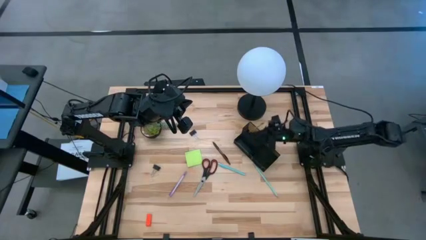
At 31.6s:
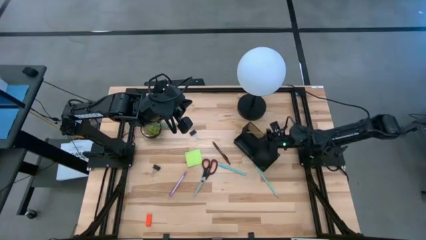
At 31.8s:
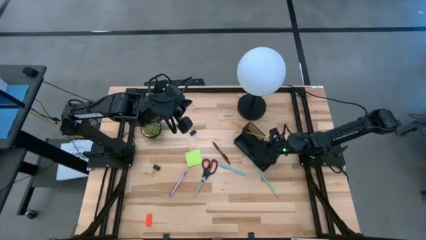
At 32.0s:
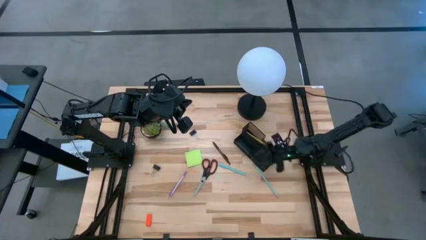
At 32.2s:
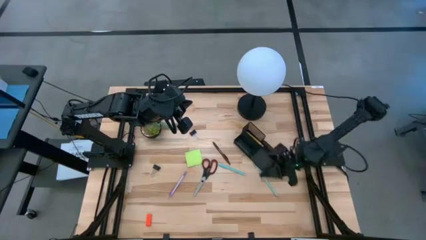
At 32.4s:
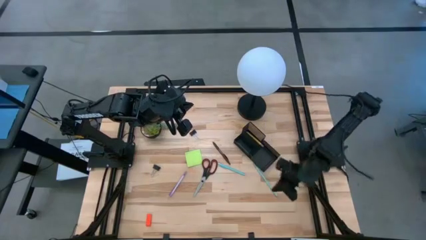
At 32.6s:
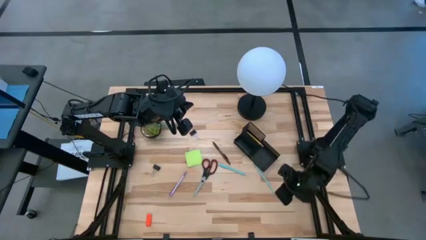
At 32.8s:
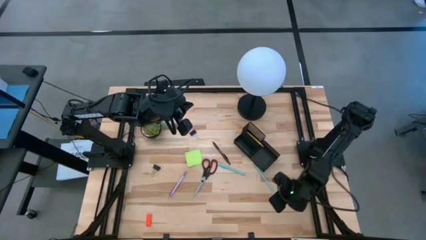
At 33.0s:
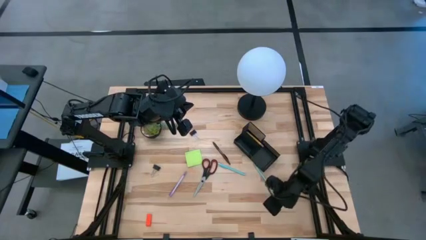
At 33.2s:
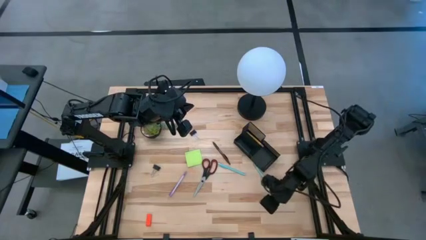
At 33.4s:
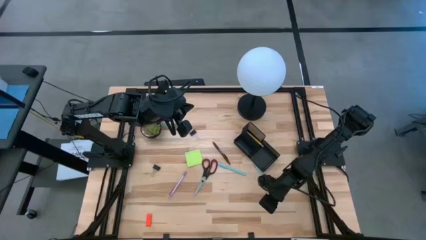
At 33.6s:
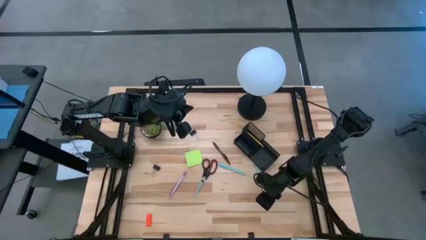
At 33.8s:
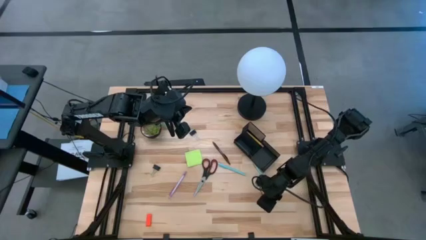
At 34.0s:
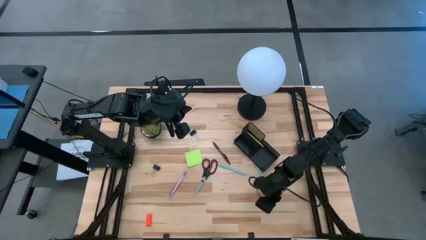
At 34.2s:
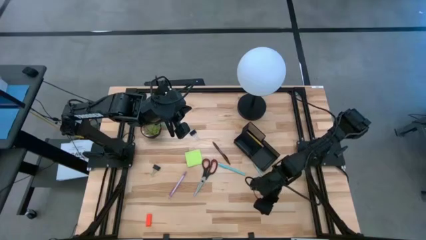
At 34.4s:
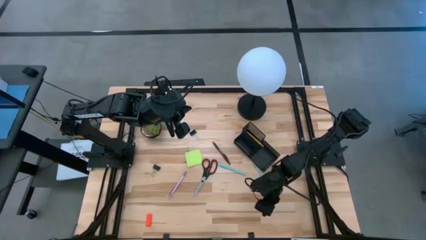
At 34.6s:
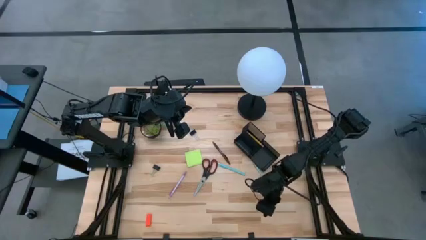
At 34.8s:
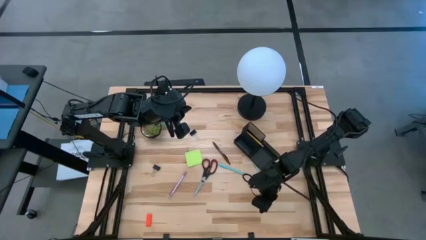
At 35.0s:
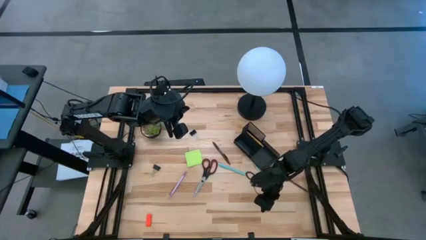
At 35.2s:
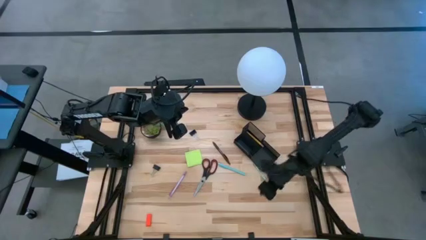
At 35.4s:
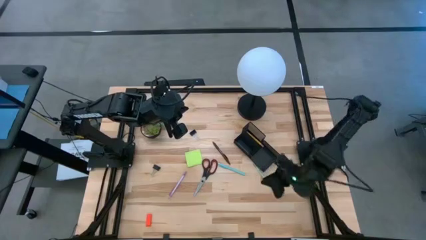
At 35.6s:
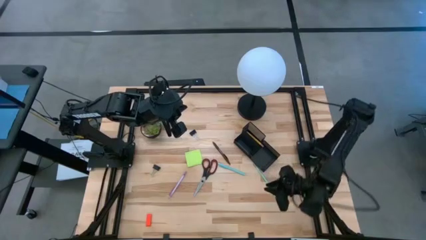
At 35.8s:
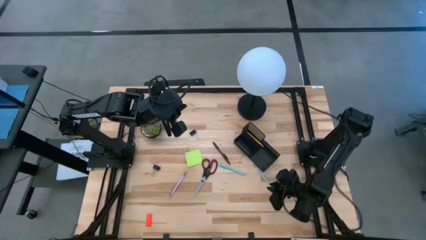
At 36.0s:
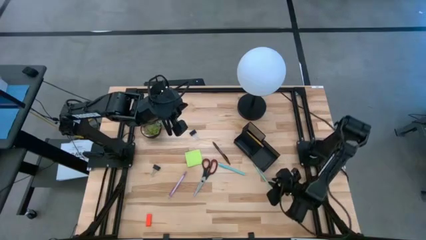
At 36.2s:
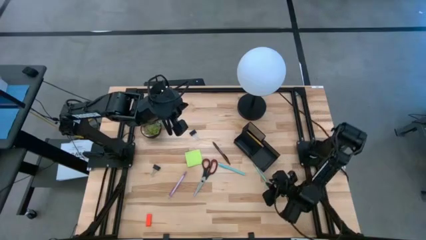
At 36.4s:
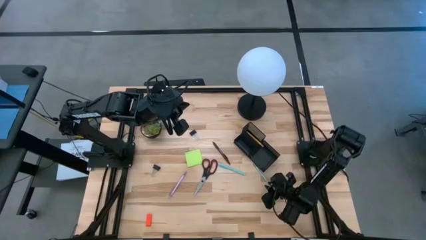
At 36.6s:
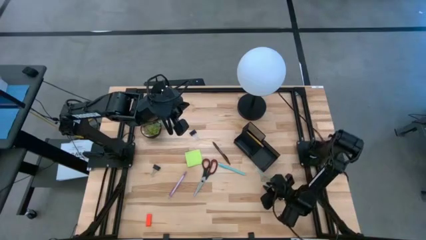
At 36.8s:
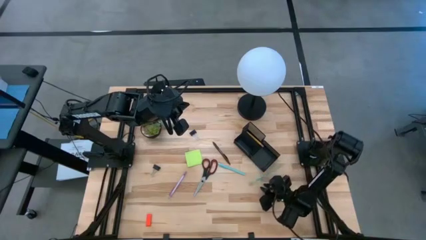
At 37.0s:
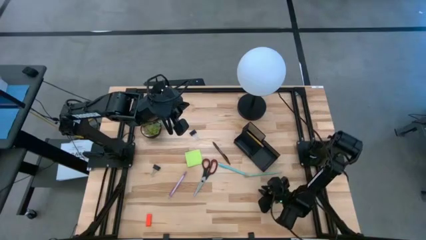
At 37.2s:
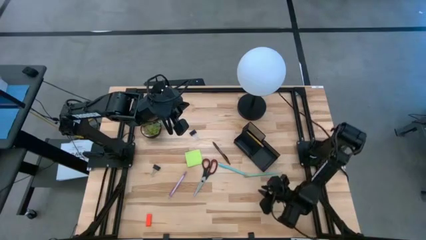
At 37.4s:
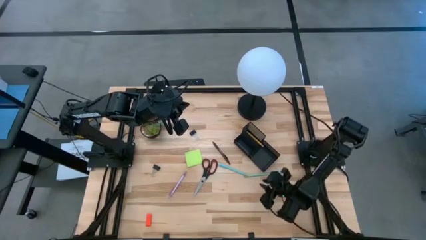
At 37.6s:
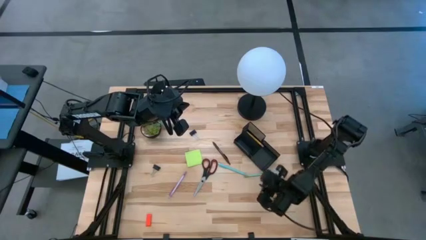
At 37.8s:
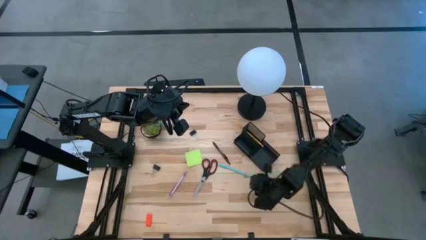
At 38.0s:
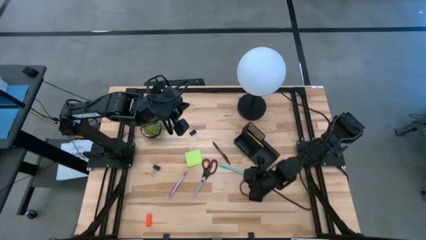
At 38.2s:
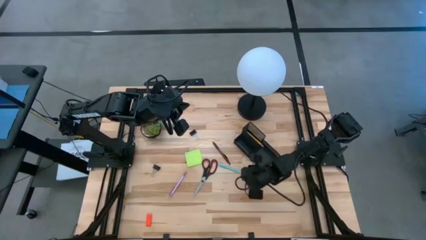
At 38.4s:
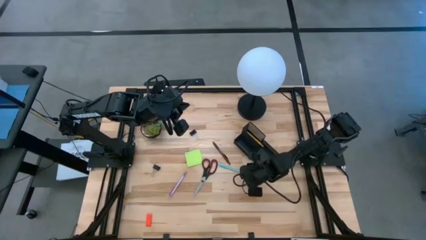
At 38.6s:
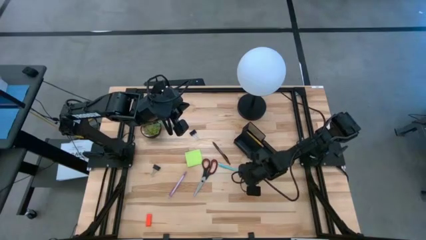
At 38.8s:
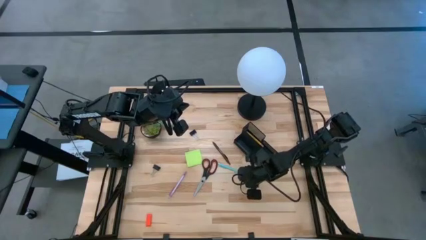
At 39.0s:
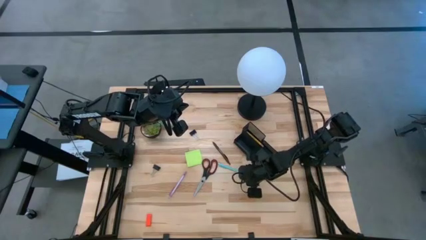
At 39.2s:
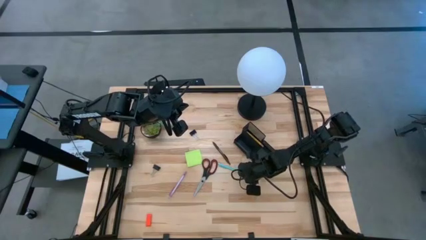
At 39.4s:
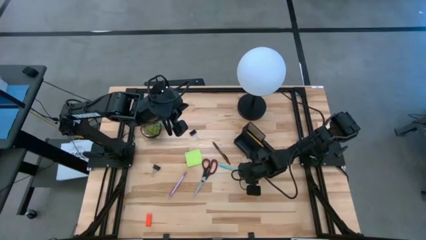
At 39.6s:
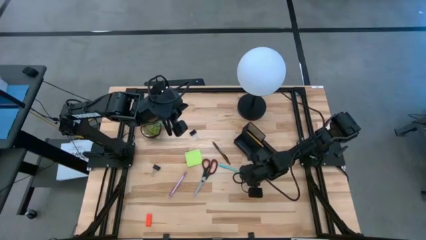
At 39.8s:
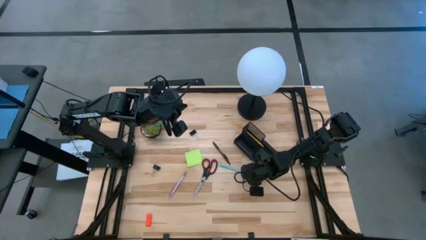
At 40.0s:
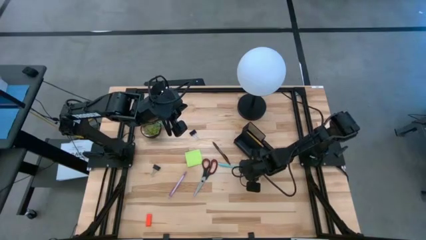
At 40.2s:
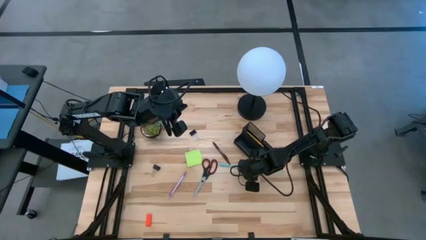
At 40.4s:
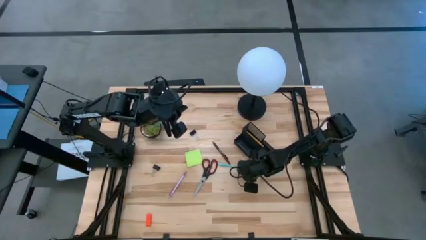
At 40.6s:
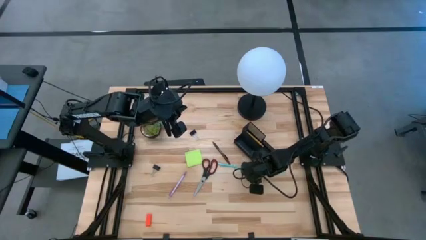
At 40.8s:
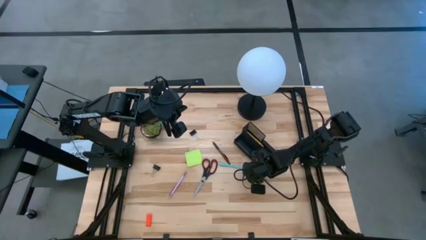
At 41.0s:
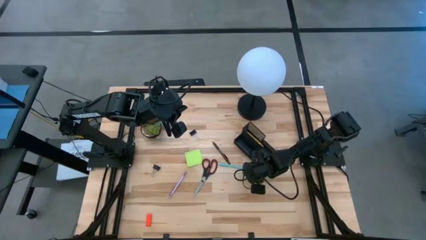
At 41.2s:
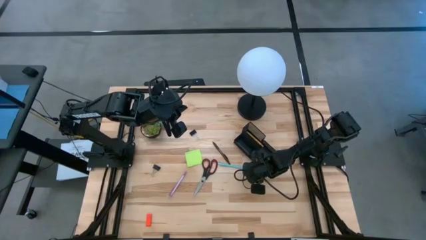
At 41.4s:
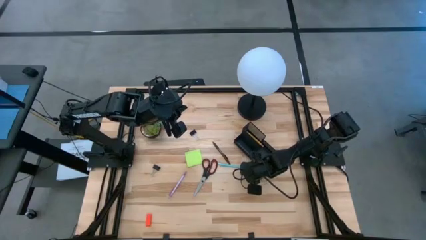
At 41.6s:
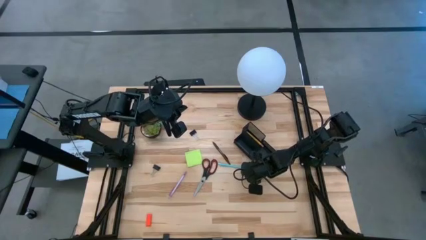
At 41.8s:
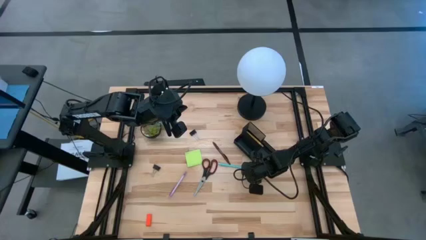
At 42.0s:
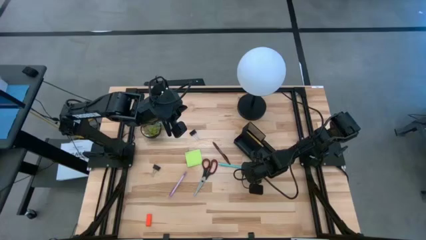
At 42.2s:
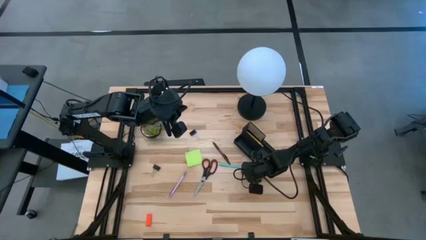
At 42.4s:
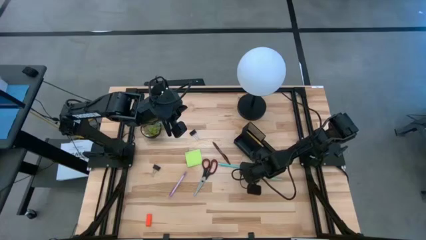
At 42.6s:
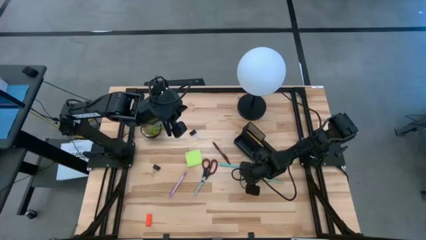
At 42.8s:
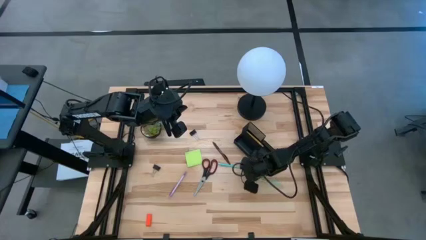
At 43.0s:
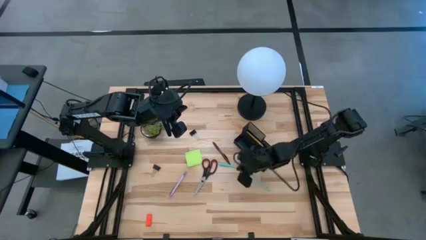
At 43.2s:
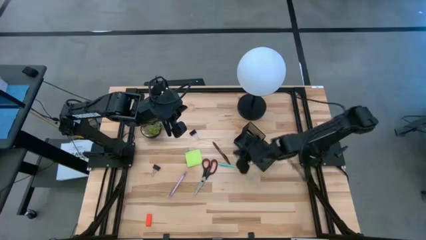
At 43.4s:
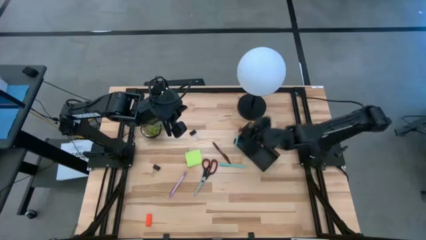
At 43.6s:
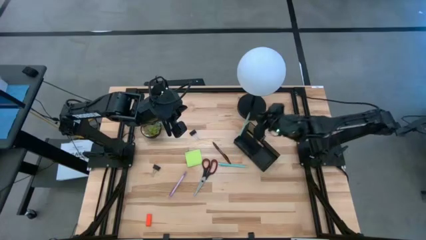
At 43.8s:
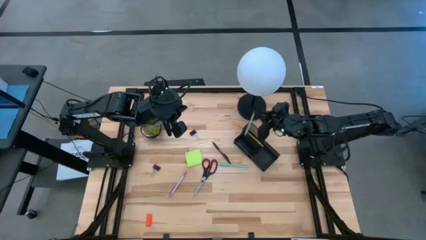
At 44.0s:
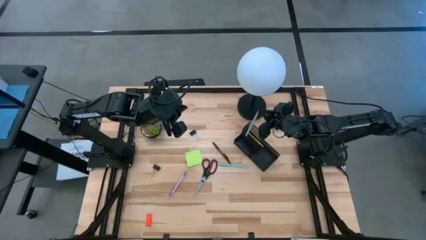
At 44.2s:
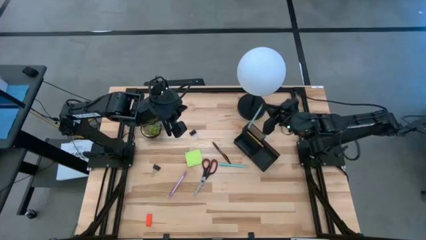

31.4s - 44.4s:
Task: Pick and place office supplies into organizer
Put the blue pencil into the black desk organizer

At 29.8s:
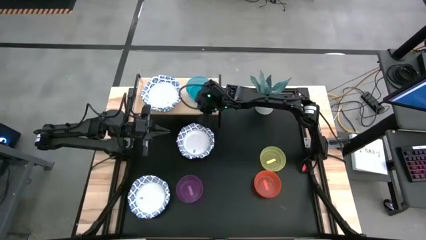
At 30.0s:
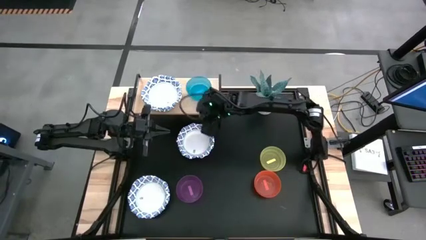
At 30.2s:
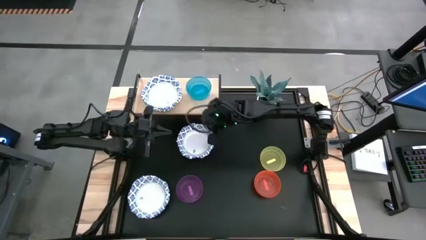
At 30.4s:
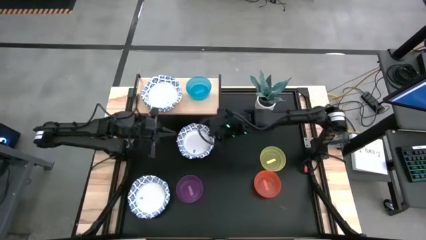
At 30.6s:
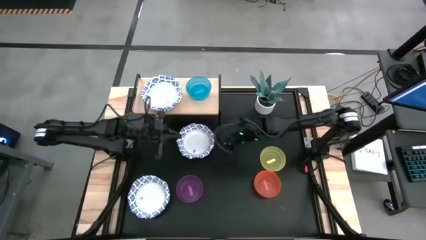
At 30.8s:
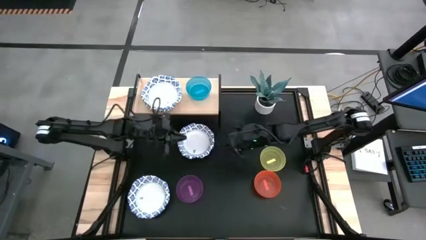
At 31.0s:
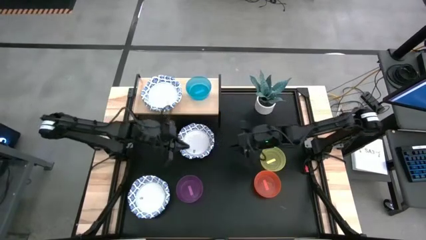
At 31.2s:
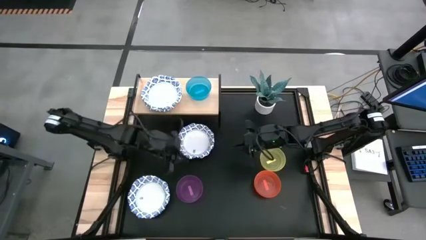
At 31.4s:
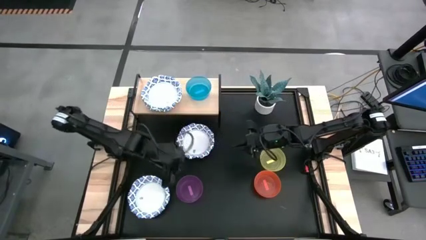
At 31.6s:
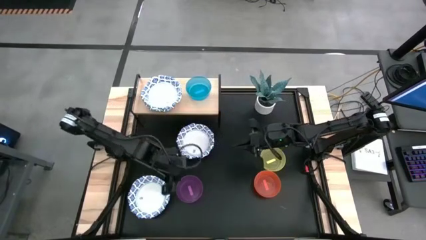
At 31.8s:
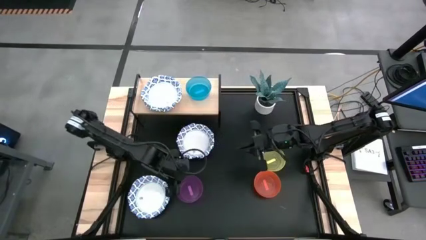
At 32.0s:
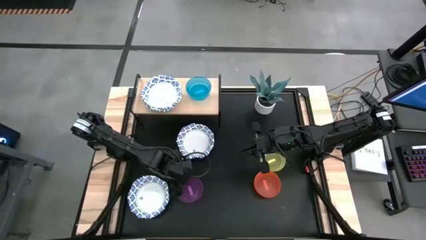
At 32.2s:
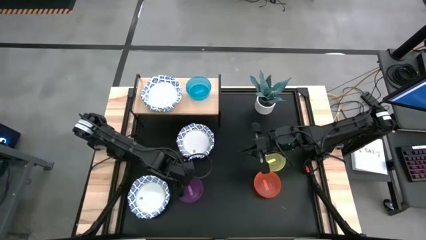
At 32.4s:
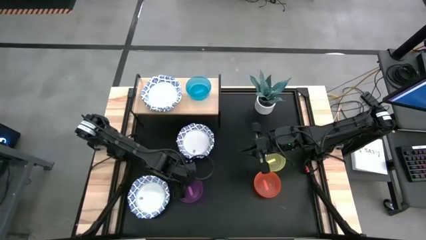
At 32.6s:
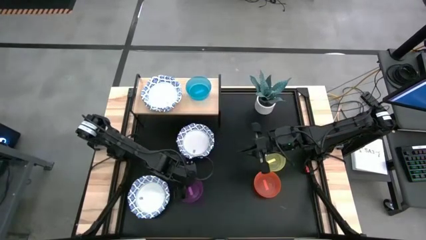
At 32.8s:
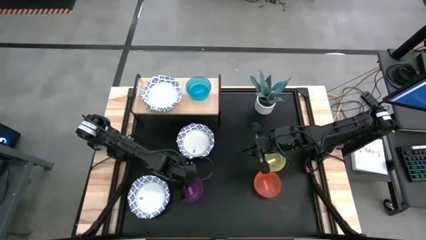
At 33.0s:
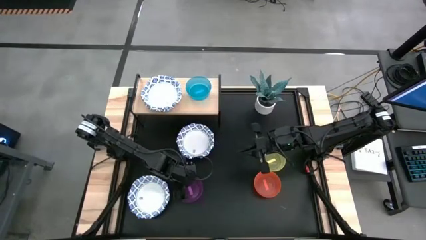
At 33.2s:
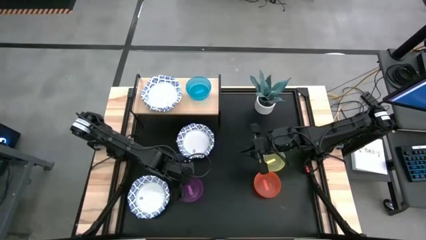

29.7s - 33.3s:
Task: Place and stack bowls onto a shelf
Stack the small purple bowl on top of the small blue bowl on the shelf
